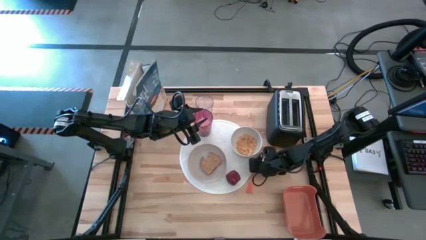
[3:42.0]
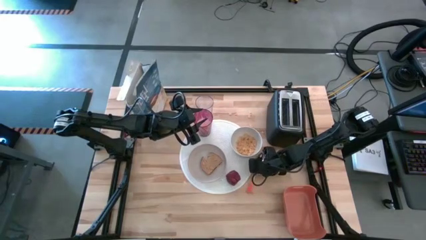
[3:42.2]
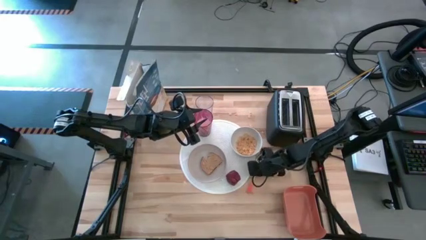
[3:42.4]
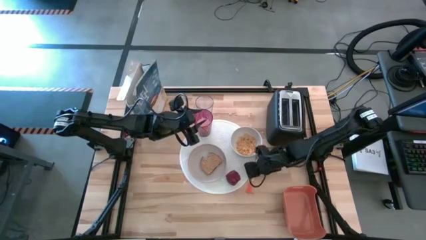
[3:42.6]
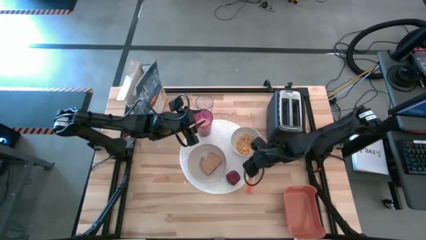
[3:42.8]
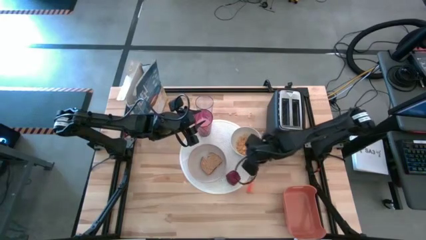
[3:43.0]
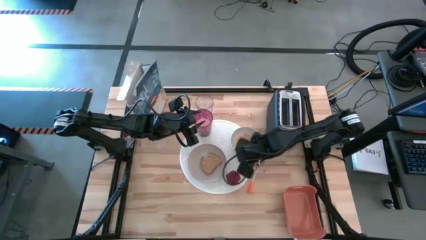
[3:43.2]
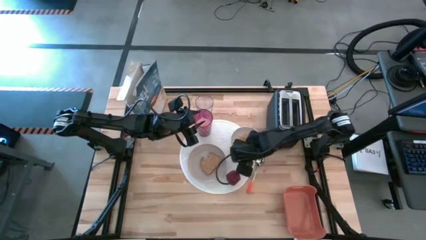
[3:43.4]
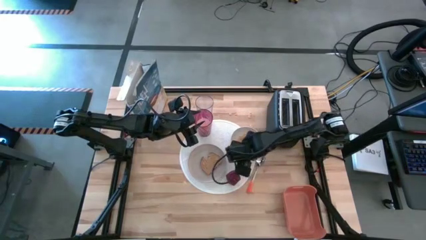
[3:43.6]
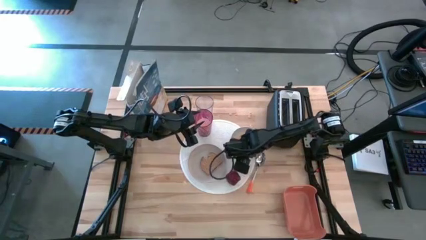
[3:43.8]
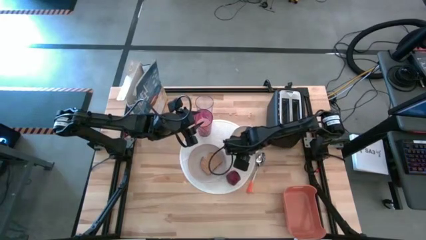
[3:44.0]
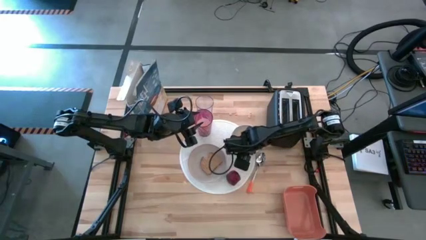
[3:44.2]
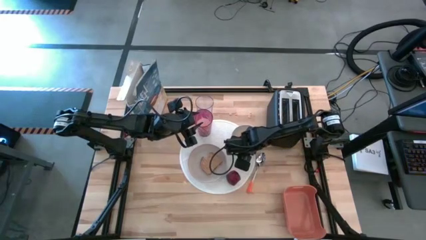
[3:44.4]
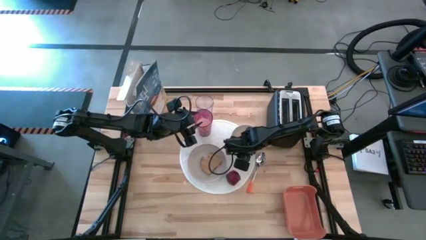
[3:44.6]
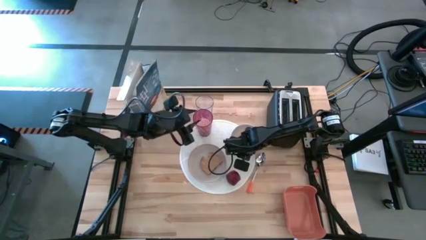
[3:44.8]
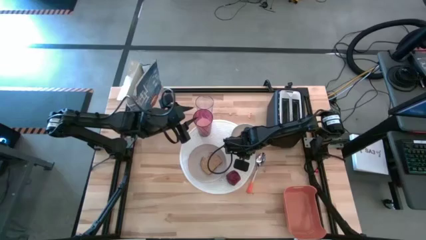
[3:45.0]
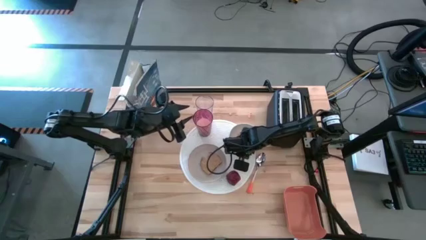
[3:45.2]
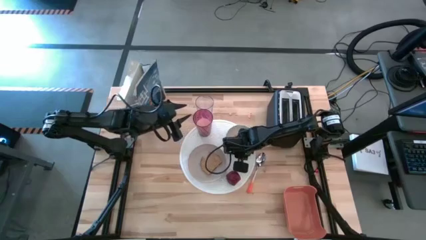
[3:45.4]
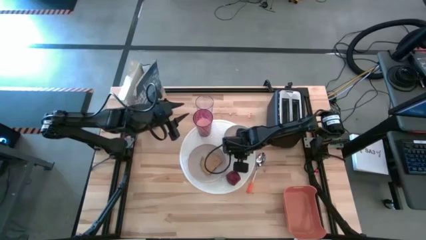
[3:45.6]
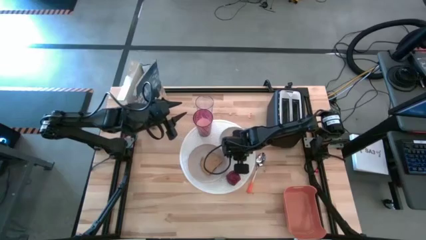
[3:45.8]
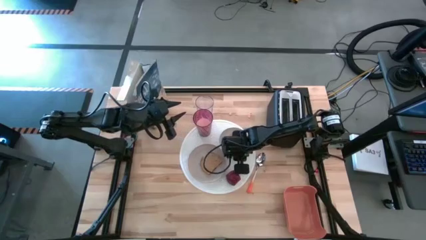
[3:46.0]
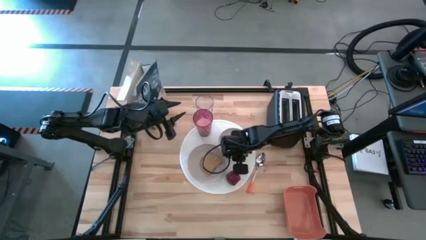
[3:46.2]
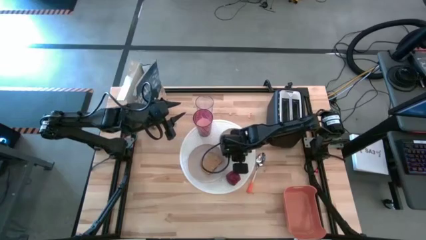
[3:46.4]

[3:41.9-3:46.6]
Task: Arrange a breakfast setting
Adjust the white bowl

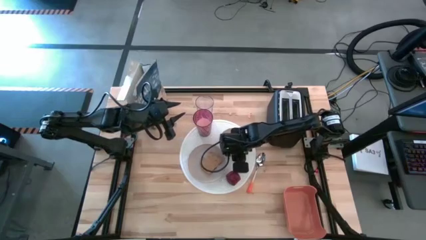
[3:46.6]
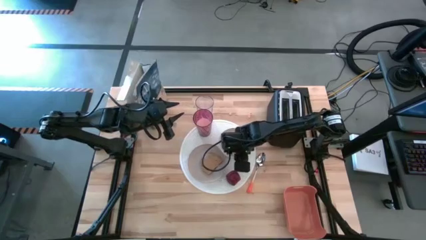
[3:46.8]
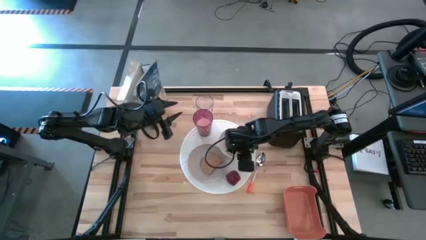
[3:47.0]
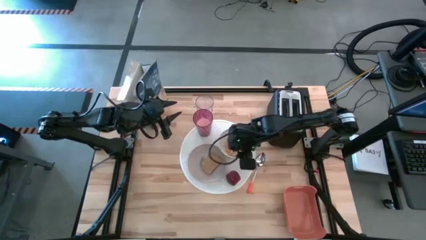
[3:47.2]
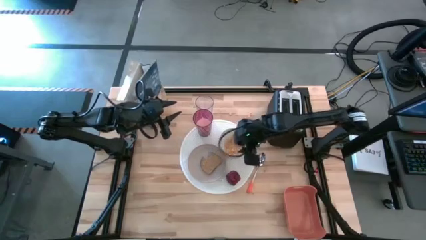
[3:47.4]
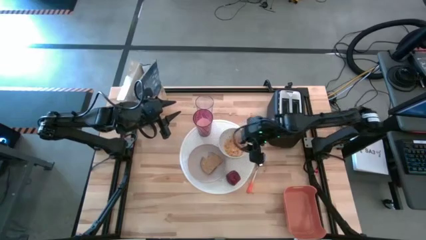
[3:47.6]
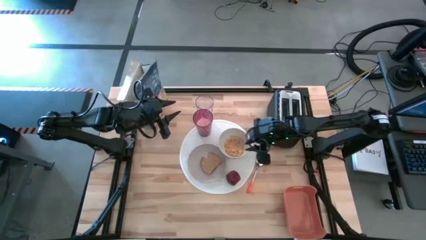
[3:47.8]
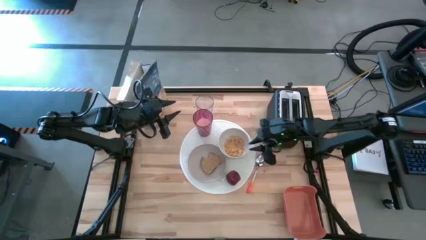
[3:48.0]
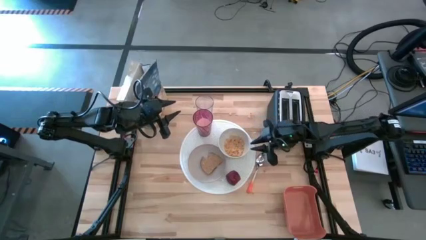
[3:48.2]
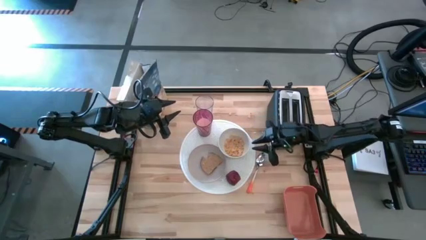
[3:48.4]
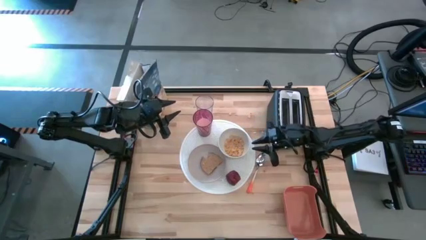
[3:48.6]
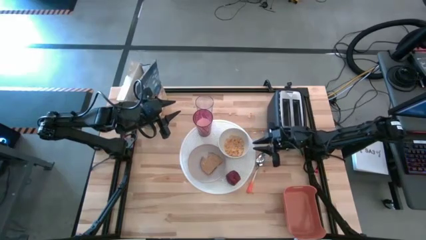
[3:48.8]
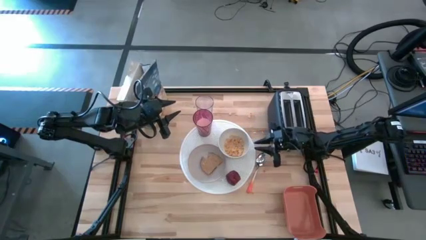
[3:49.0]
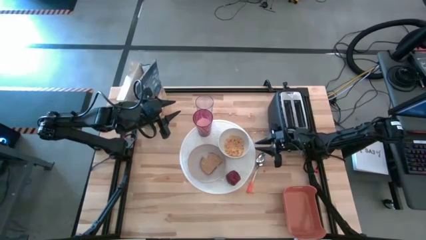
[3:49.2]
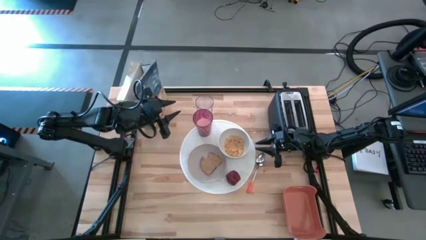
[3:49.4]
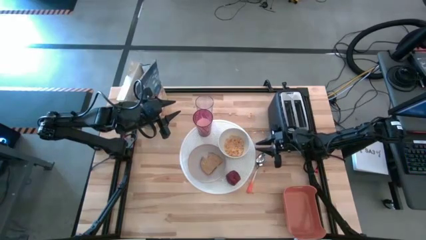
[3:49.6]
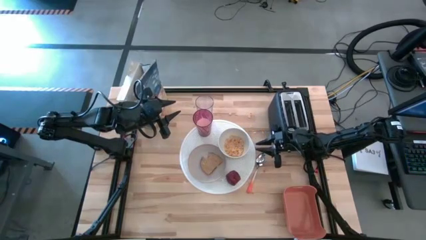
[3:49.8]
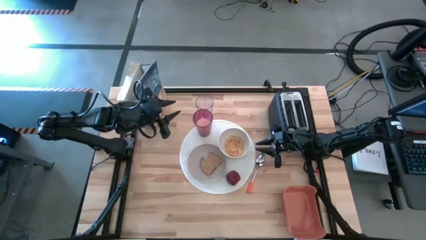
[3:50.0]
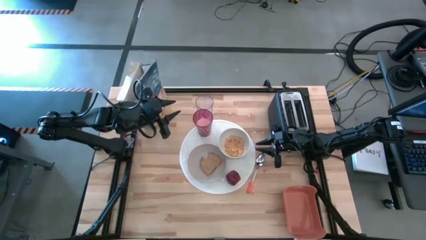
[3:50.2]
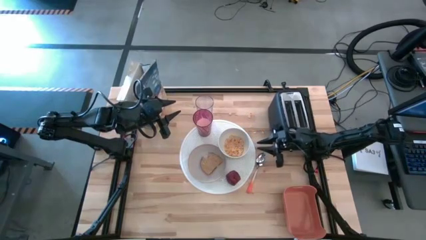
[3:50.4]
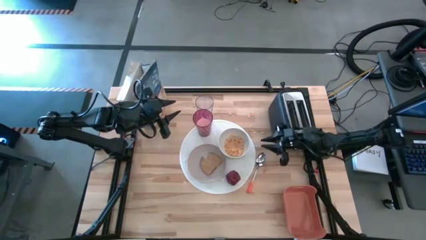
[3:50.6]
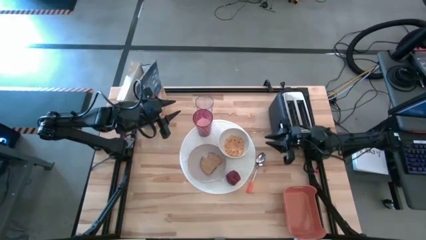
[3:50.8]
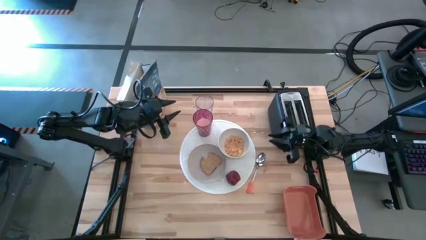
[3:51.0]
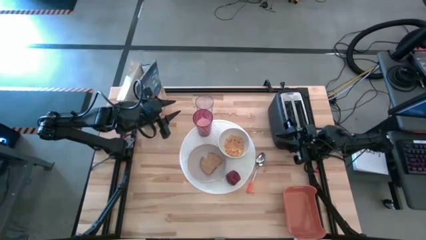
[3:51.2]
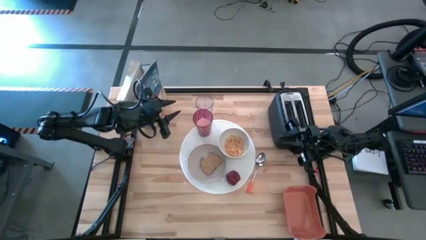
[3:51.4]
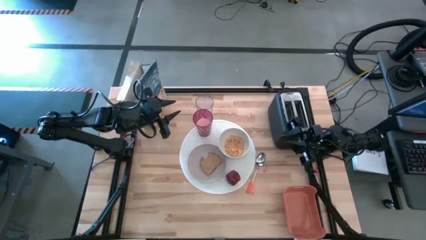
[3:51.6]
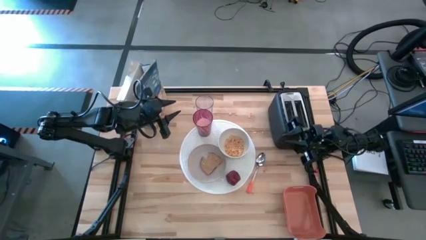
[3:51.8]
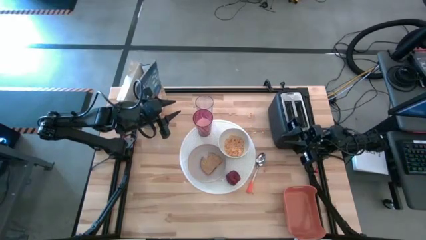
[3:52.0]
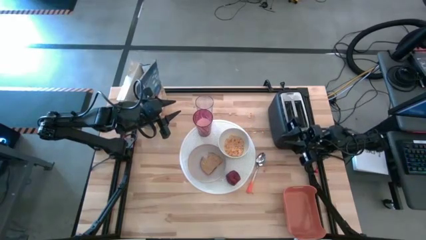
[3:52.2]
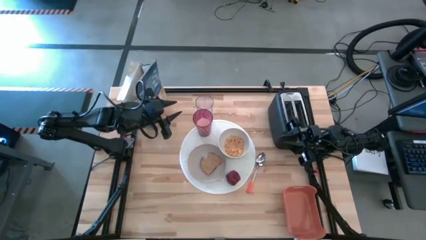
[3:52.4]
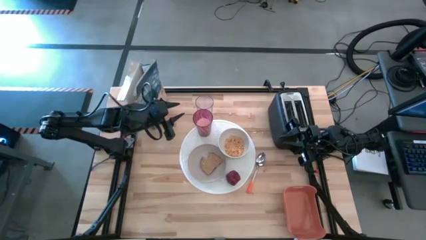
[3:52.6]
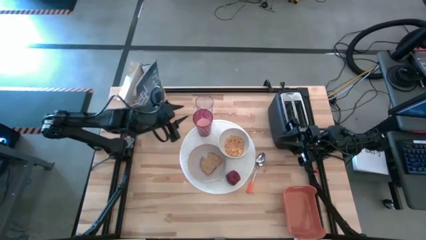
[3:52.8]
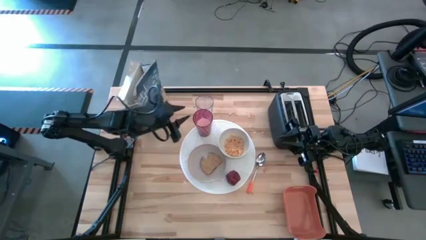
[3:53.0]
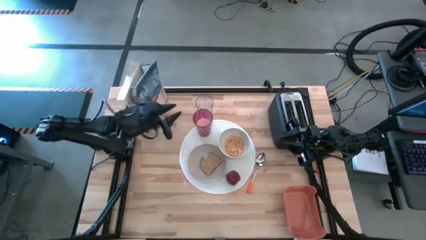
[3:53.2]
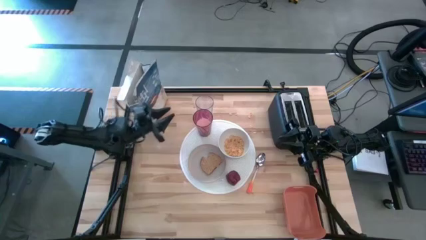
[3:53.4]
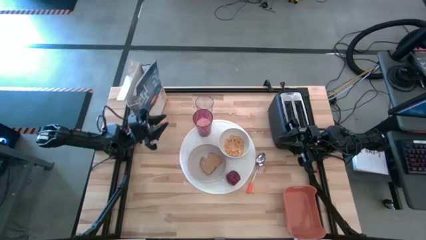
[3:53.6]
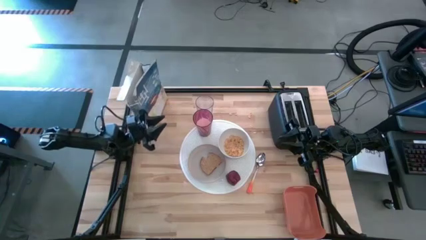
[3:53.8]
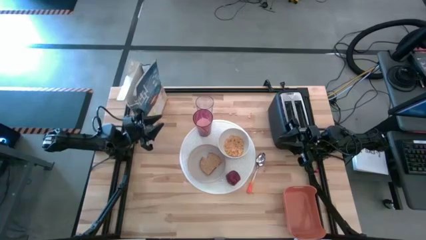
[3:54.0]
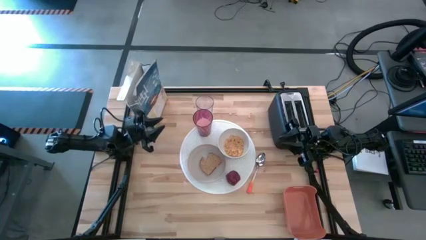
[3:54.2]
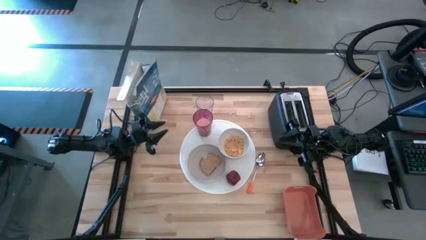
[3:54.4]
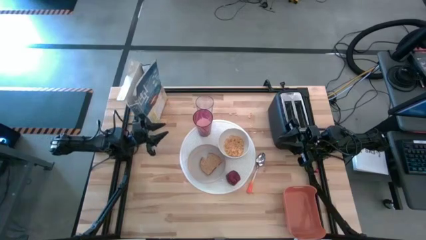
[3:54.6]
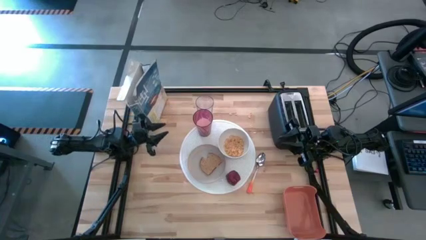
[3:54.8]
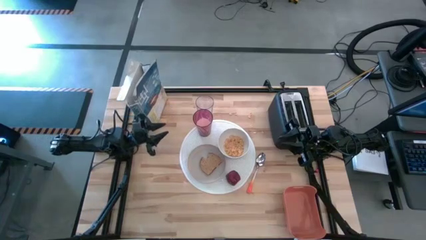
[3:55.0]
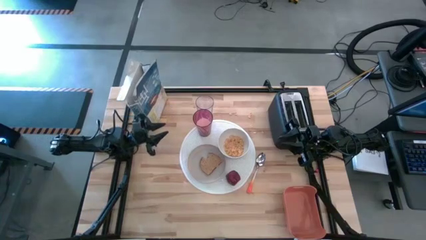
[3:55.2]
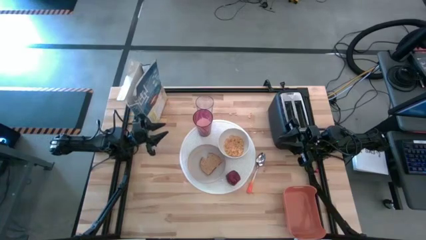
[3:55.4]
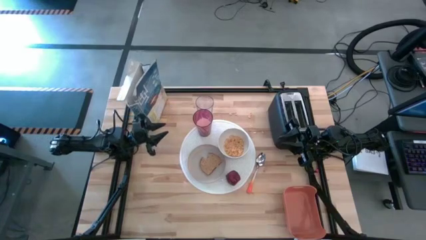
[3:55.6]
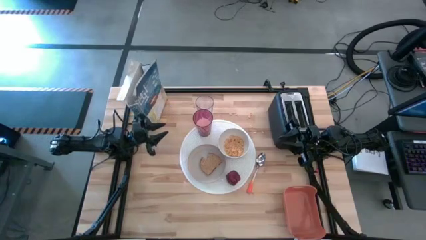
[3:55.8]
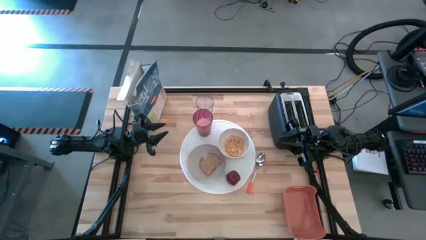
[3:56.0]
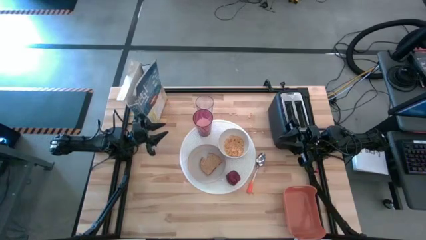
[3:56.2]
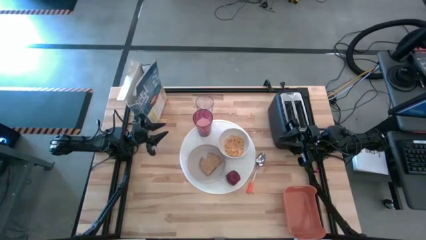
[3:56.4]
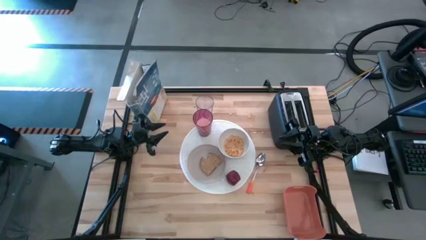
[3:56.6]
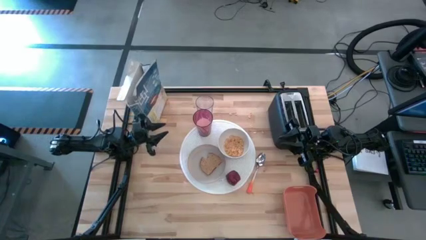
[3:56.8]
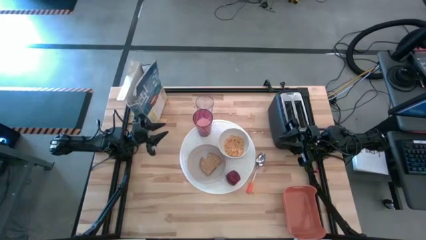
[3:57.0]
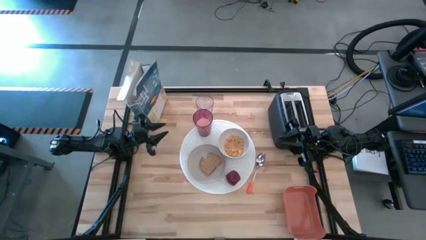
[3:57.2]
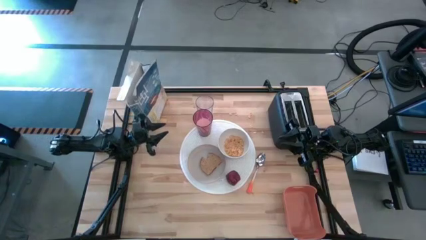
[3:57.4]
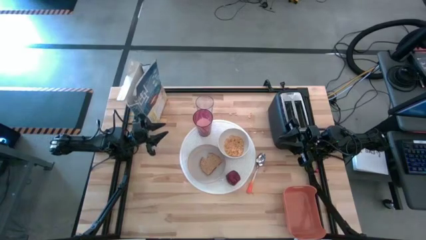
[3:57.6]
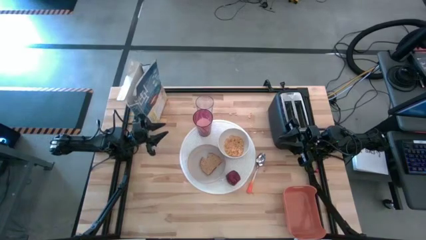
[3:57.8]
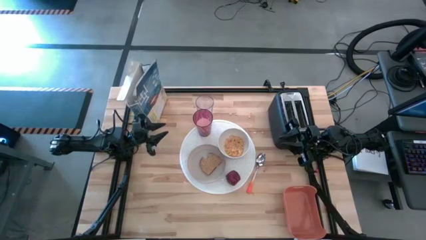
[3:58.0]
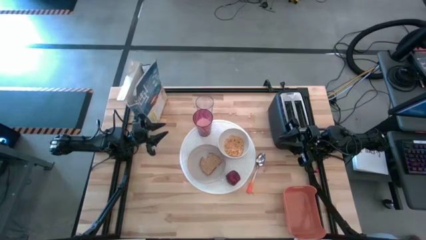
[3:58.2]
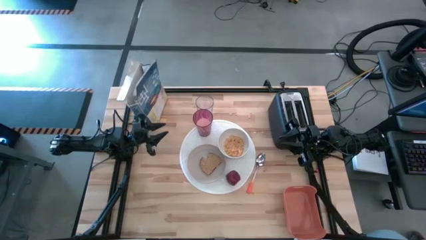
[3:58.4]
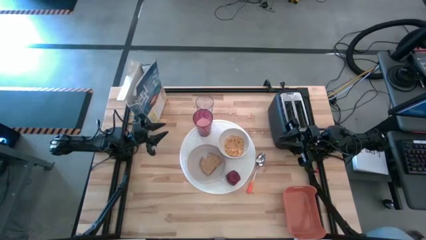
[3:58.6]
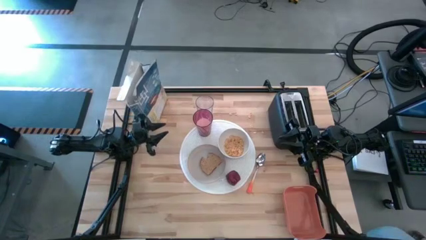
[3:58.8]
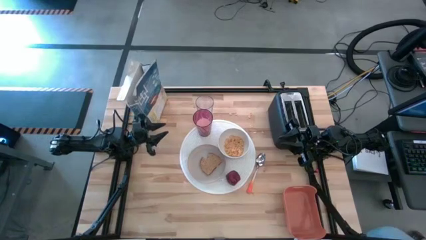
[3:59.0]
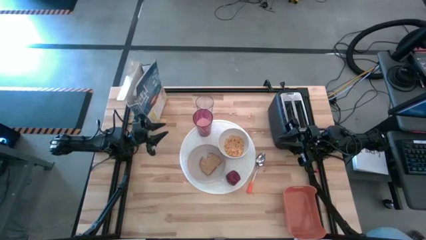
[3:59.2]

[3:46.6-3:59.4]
Return to Home Position
